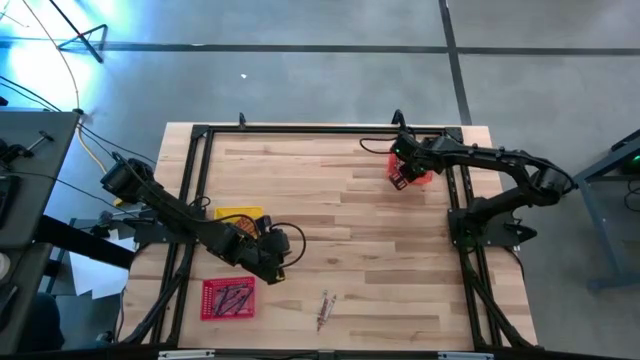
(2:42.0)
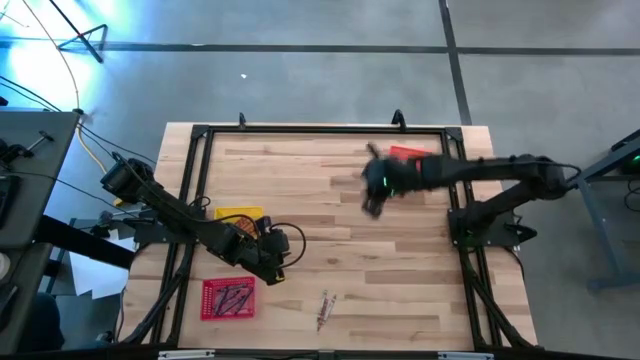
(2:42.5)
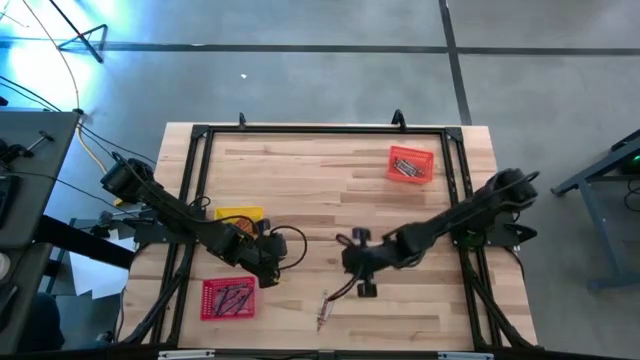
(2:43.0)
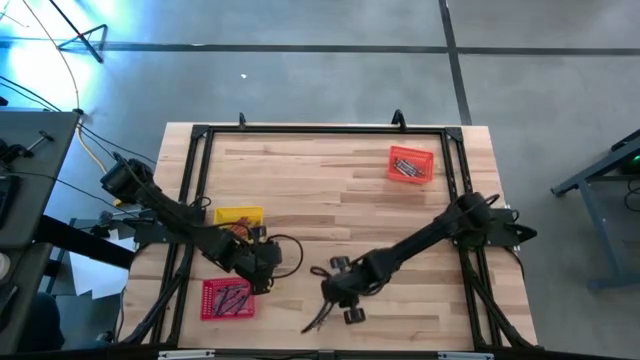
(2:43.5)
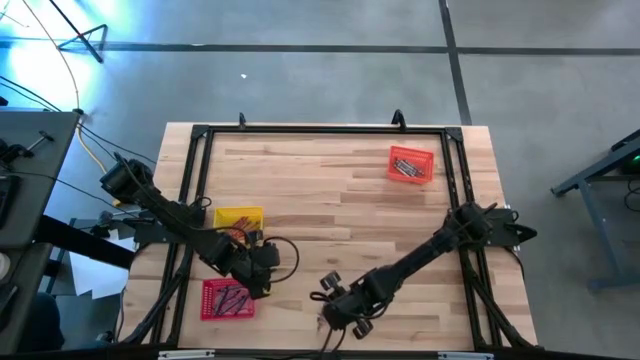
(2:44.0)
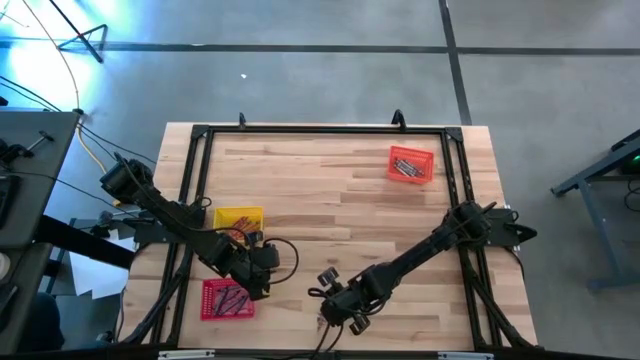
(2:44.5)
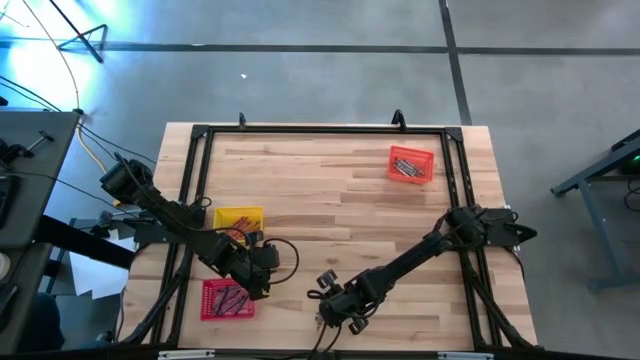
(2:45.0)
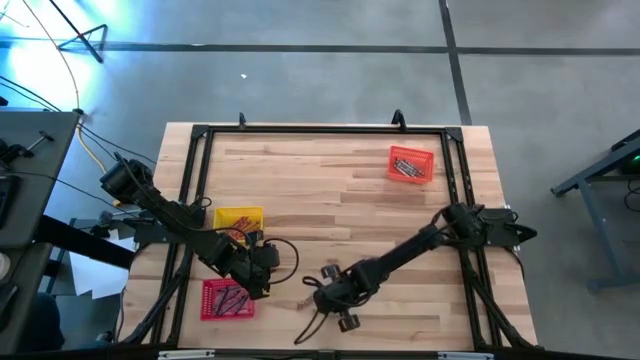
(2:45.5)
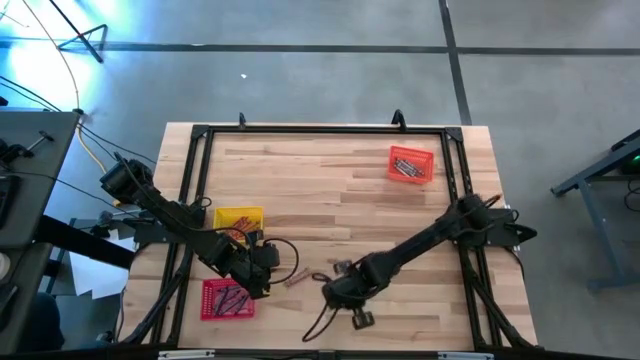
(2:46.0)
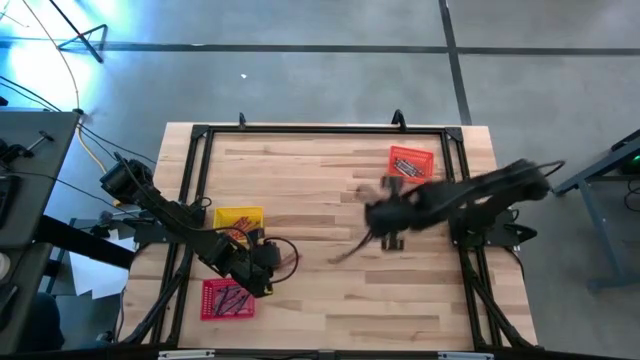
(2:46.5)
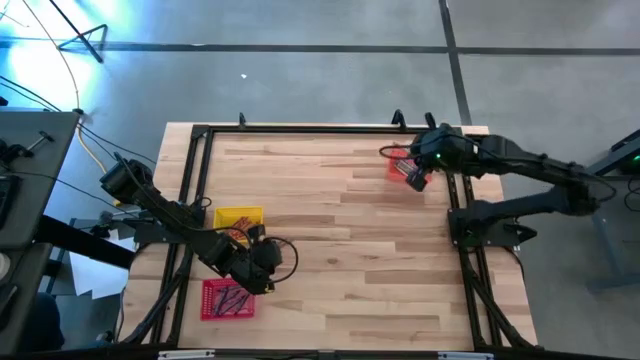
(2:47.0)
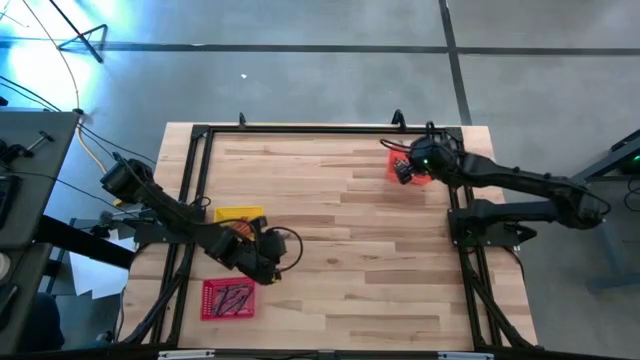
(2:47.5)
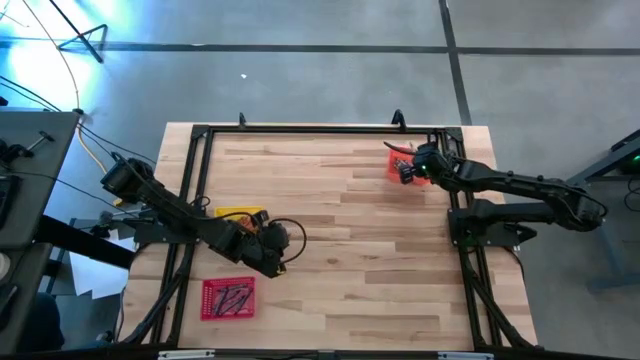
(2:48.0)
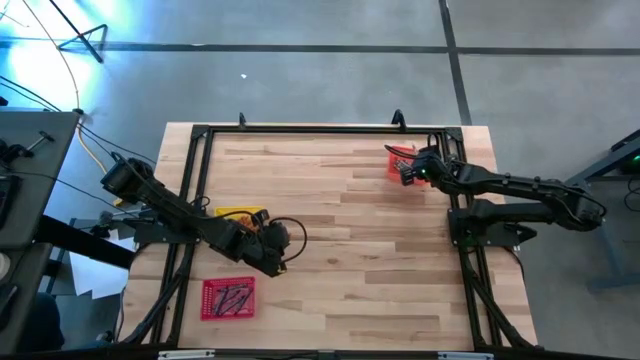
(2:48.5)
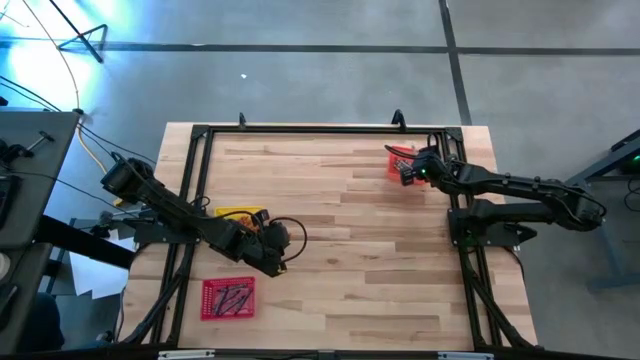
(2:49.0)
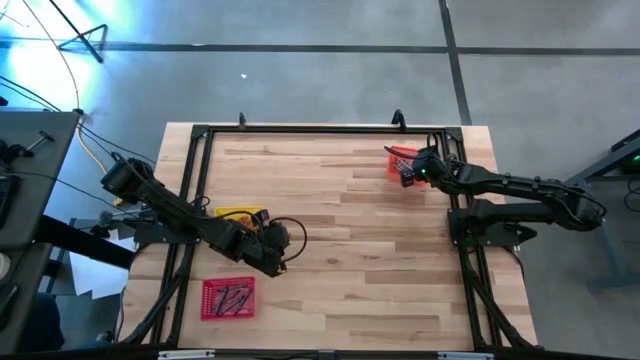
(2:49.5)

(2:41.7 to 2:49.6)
Task: Sort crayons
Put the gray crayon into the orange bin

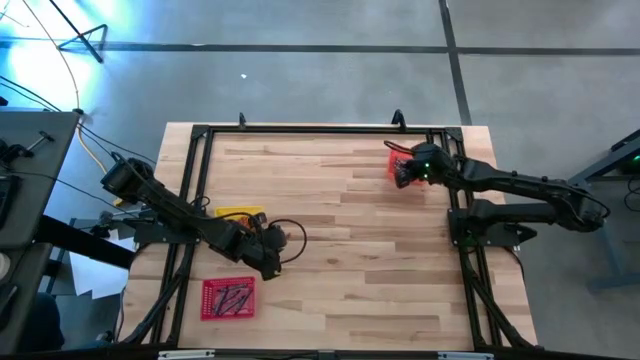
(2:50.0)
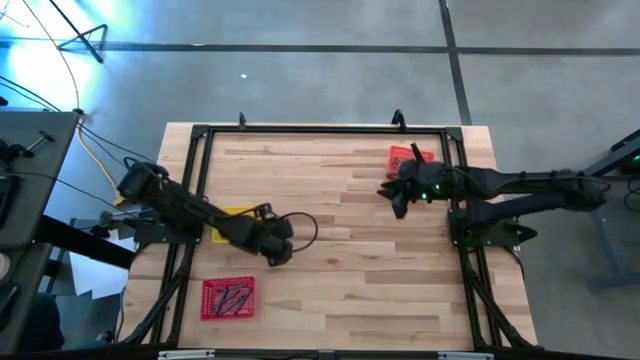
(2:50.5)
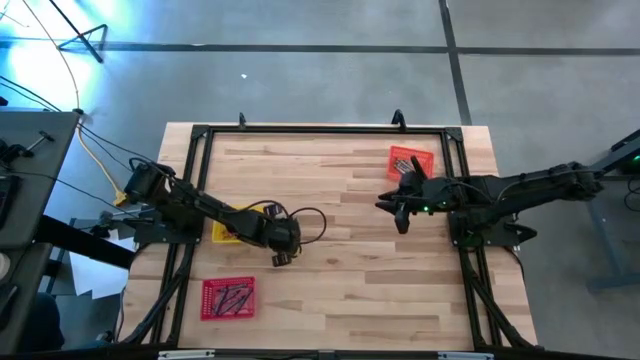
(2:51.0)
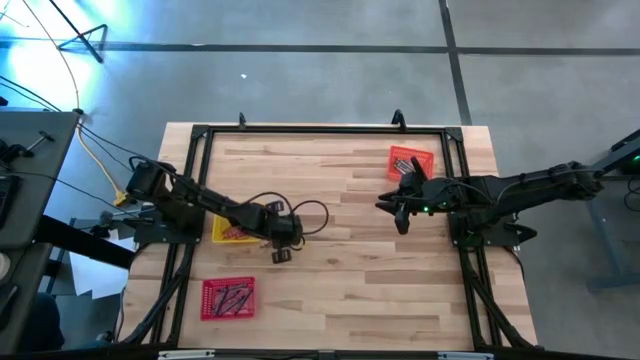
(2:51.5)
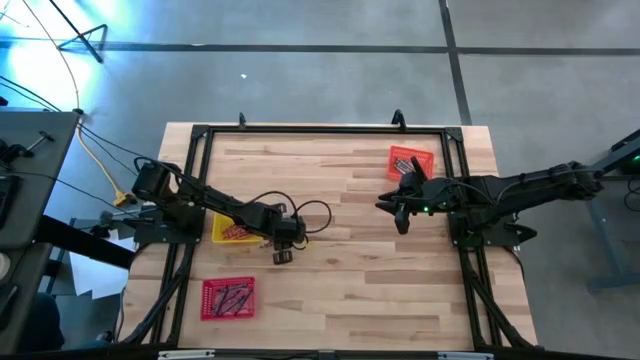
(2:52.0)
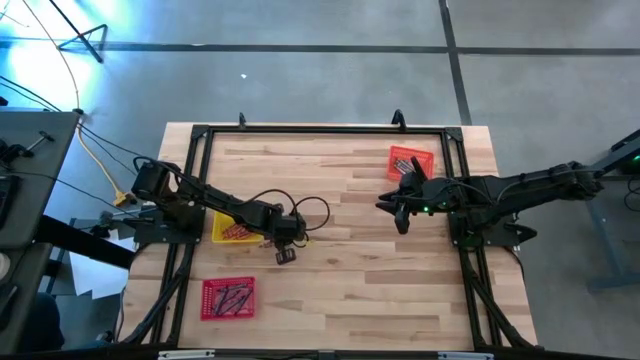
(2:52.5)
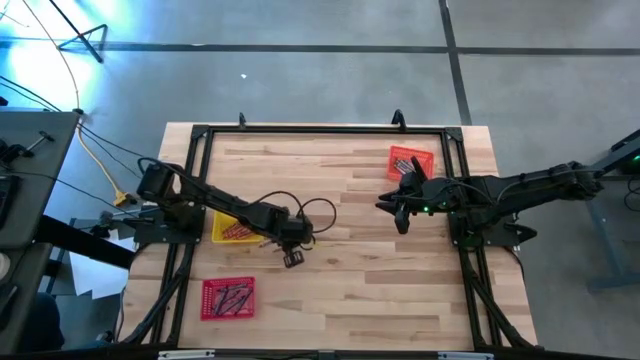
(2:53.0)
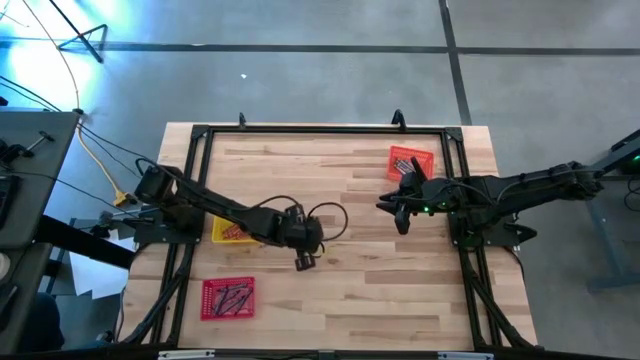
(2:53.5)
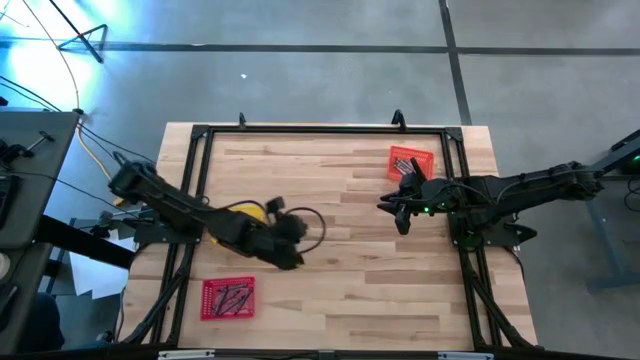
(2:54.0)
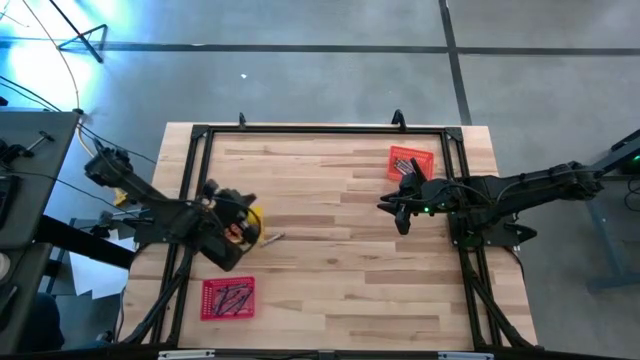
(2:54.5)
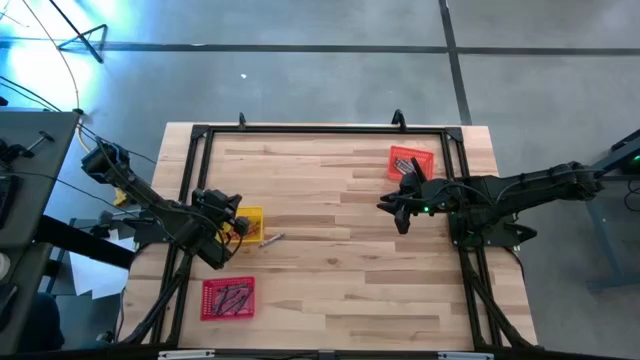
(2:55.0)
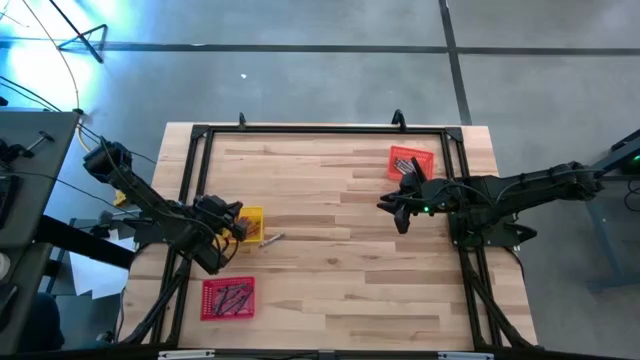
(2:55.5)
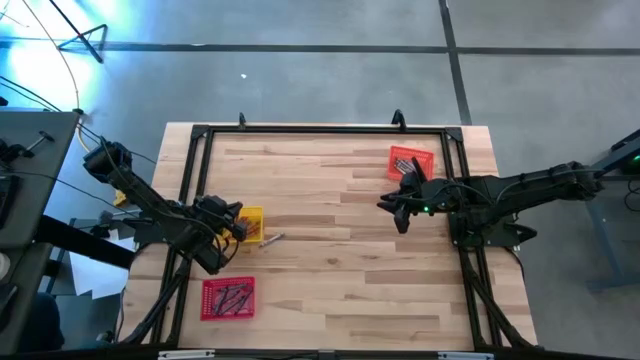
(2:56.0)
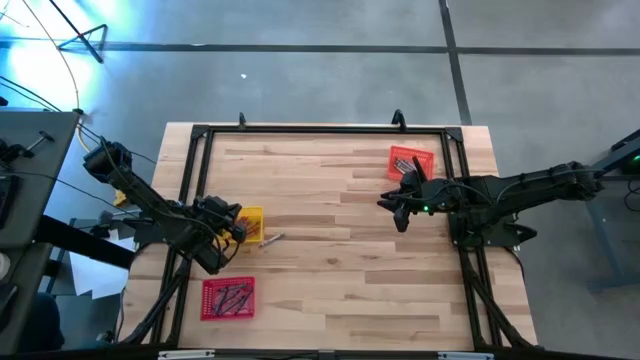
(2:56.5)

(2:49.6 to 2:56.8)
Put the orange crayon into the yellow bin

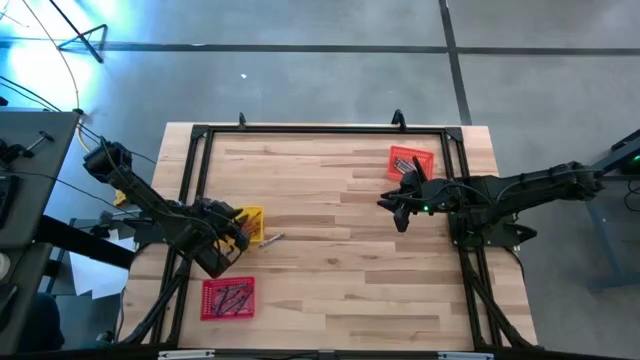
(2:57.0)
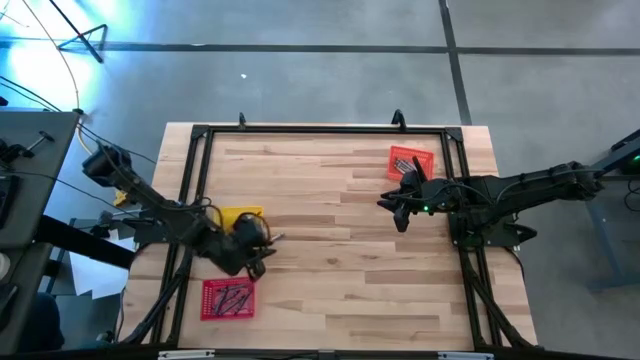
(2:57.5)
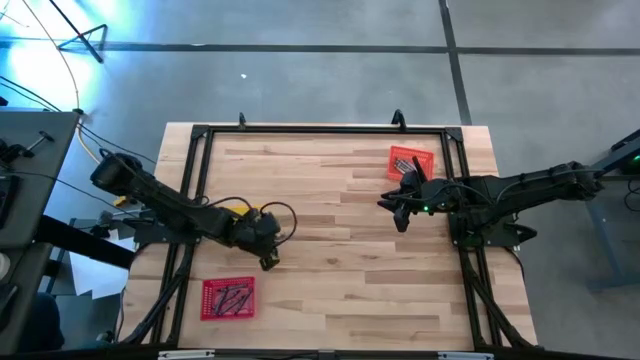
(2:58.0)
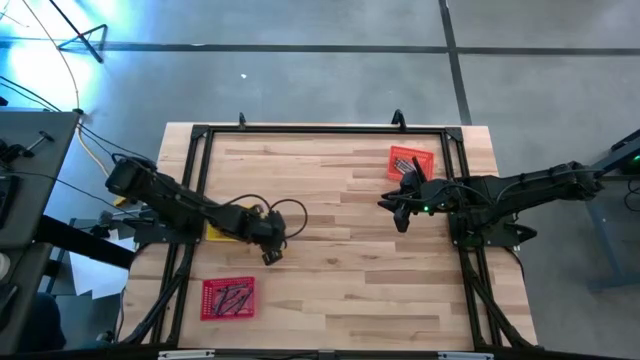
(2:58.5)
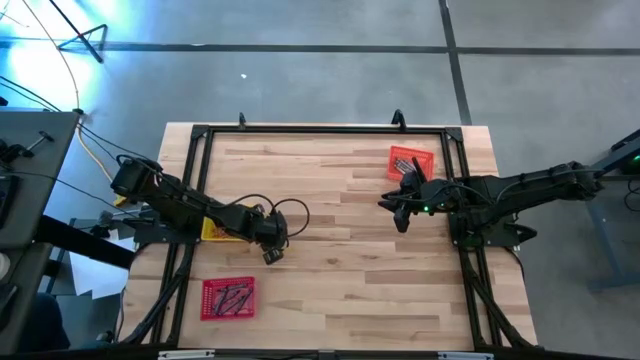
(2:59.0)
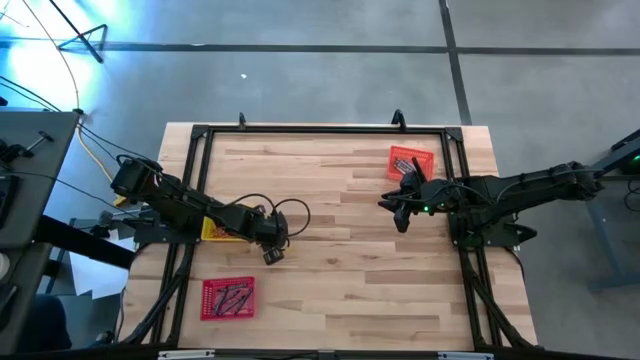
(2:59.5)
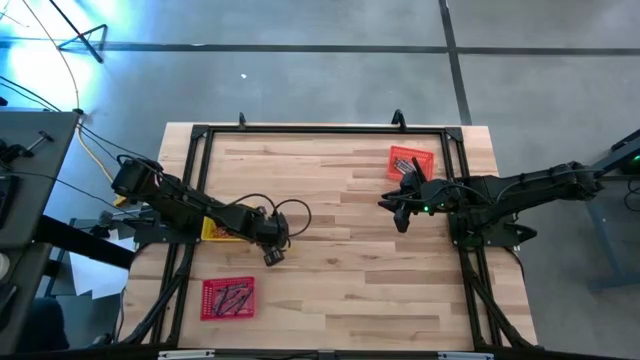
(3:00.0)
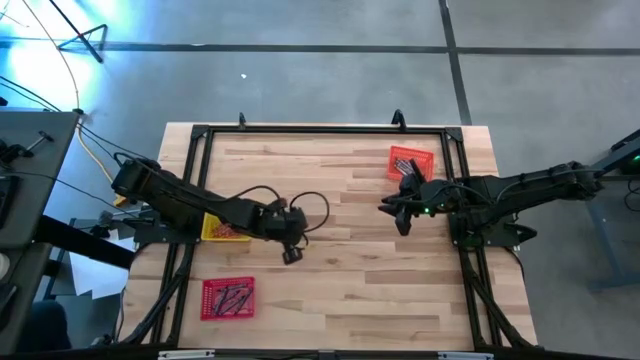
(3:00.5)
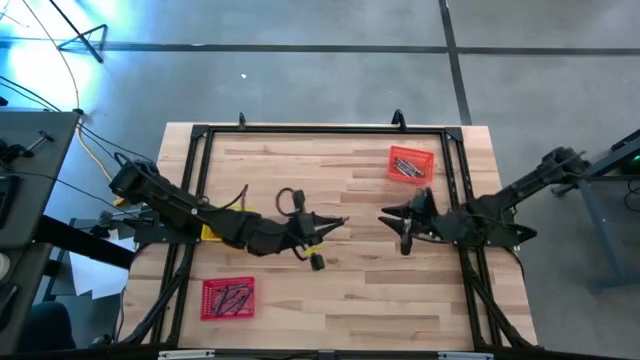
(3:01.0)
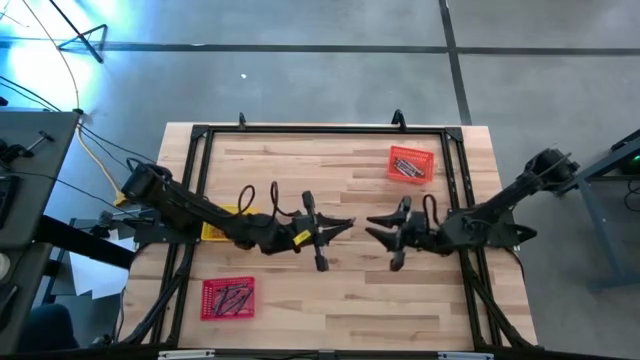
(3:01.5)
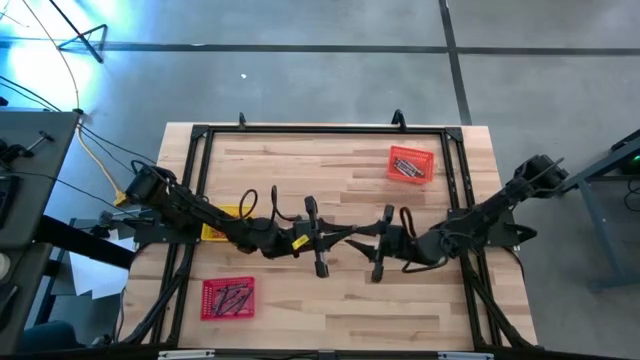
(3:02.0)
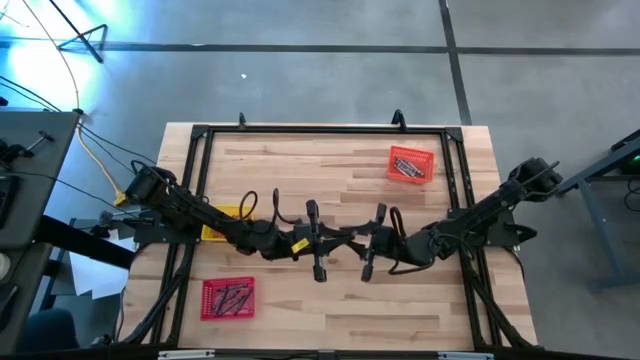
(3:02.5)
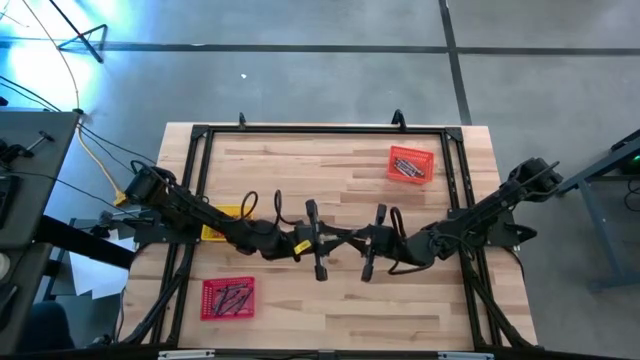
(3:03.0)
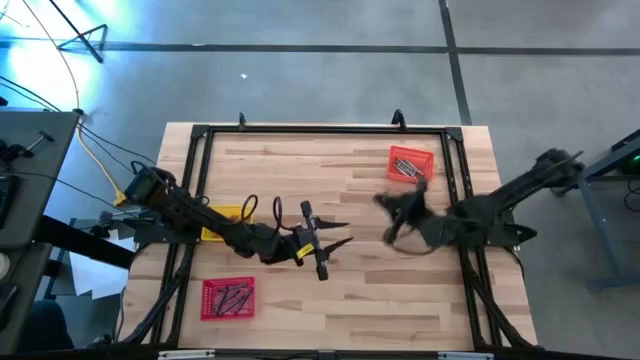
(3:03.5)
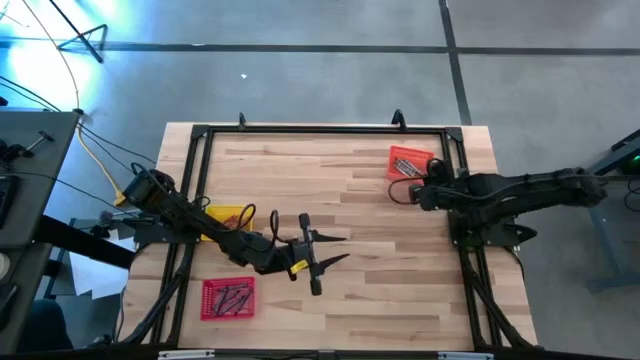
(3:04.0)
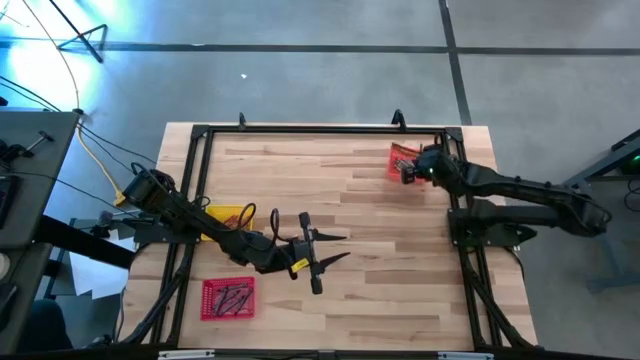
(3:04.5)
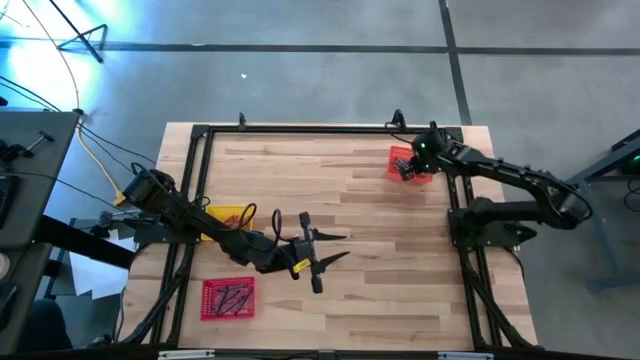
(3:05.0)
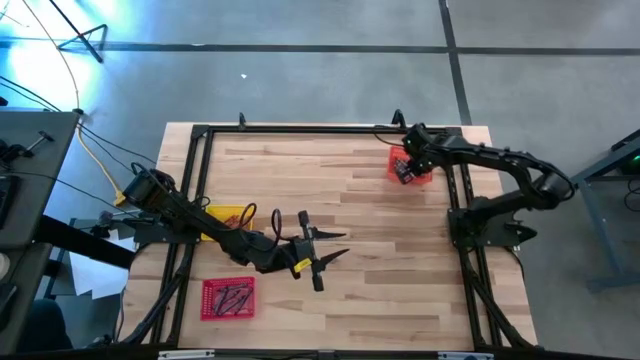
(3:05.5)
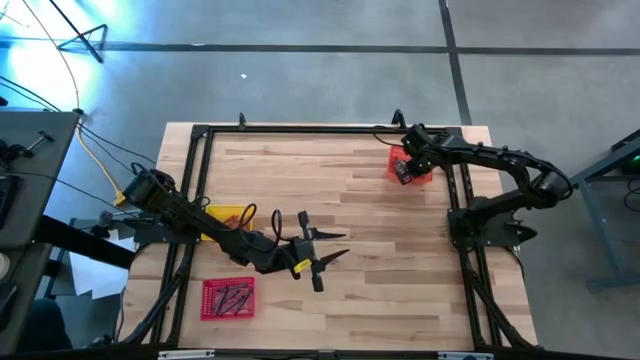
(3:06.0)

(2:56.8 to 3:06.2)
Put the gray crayon into the orange bin
